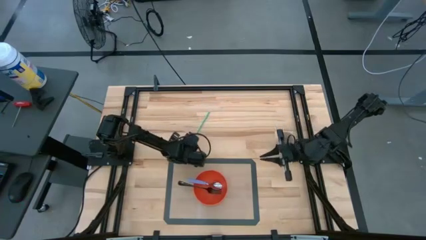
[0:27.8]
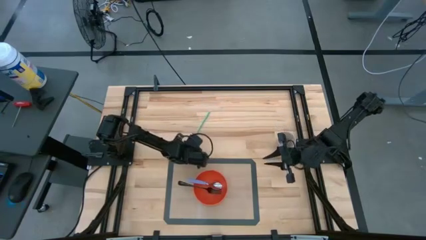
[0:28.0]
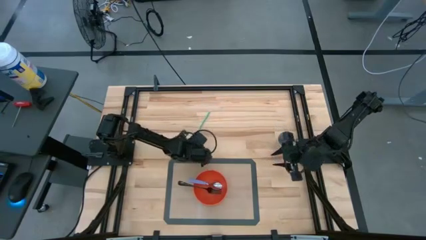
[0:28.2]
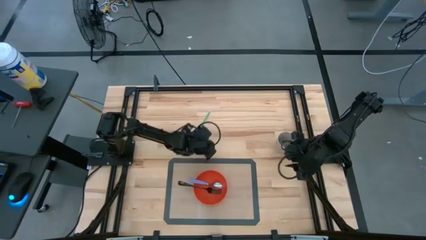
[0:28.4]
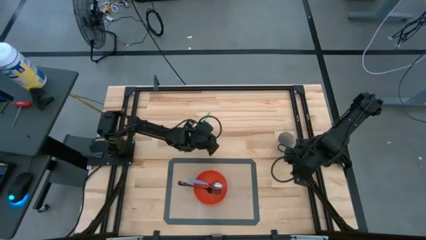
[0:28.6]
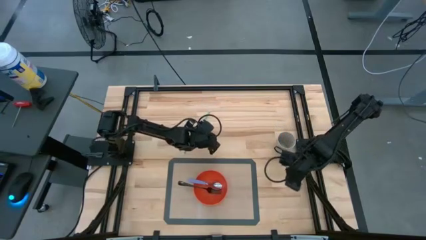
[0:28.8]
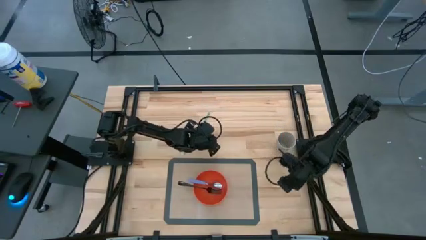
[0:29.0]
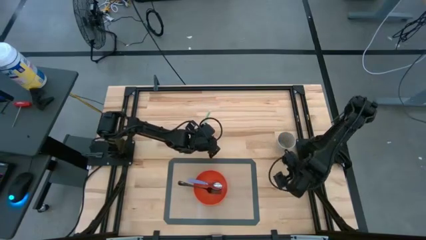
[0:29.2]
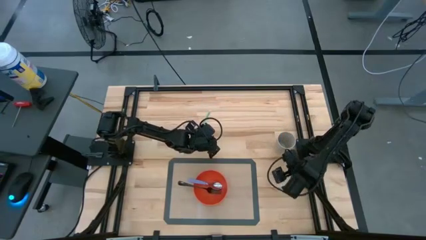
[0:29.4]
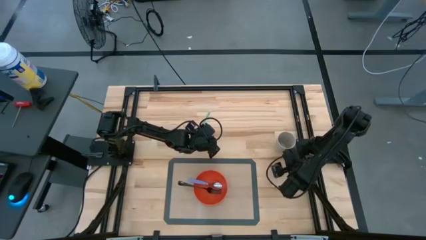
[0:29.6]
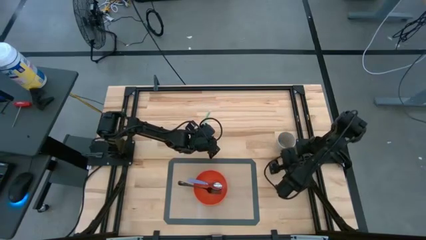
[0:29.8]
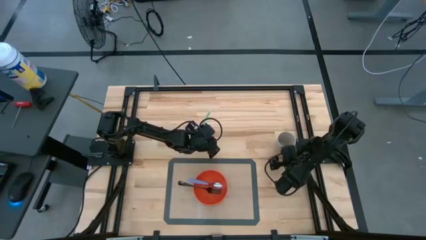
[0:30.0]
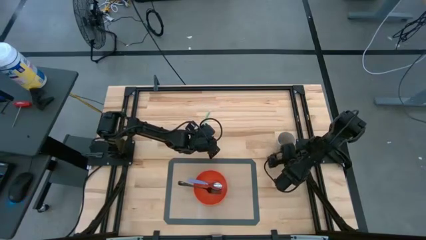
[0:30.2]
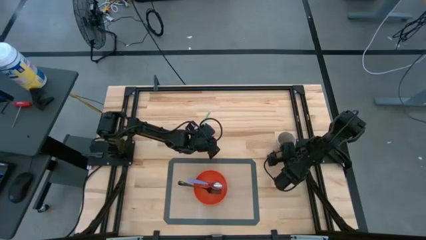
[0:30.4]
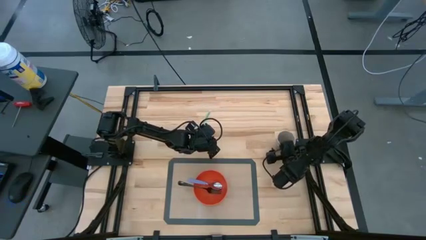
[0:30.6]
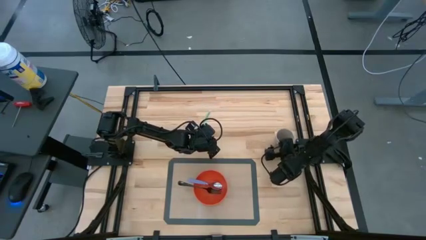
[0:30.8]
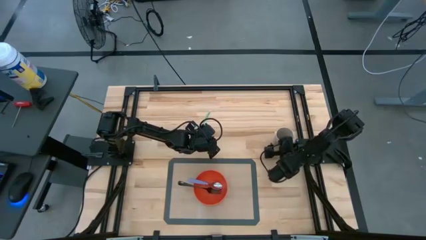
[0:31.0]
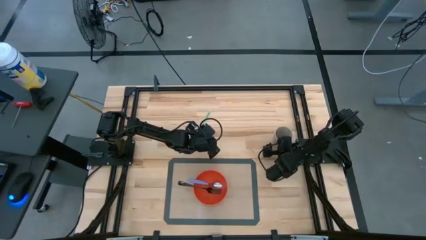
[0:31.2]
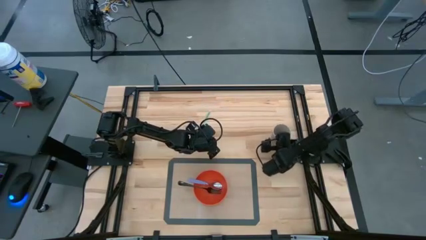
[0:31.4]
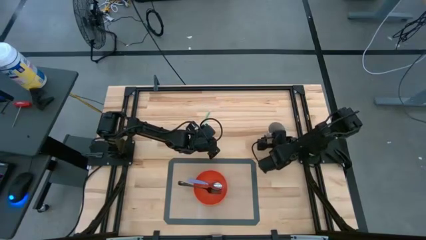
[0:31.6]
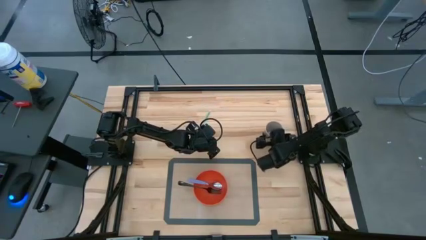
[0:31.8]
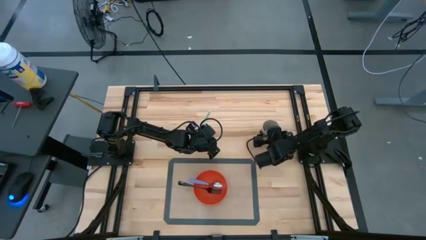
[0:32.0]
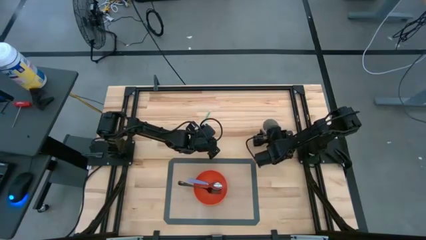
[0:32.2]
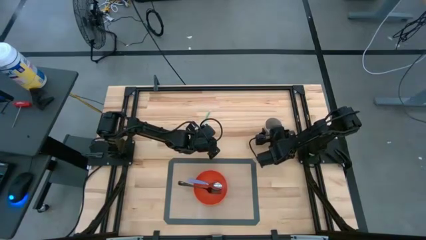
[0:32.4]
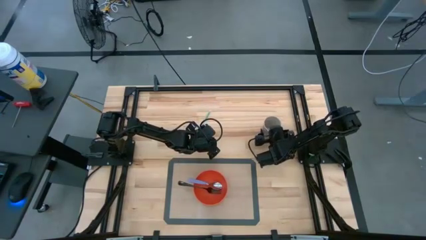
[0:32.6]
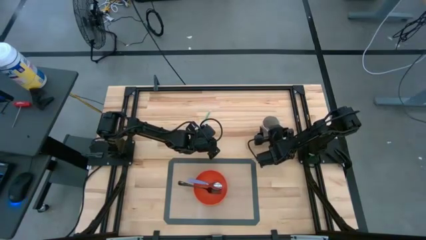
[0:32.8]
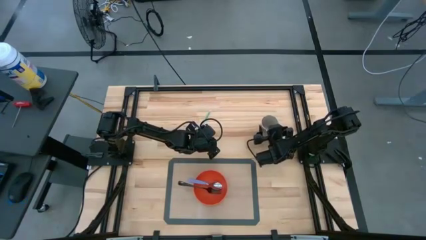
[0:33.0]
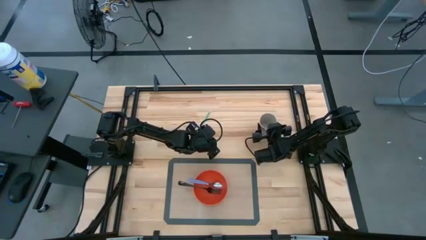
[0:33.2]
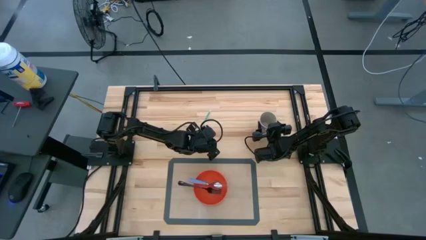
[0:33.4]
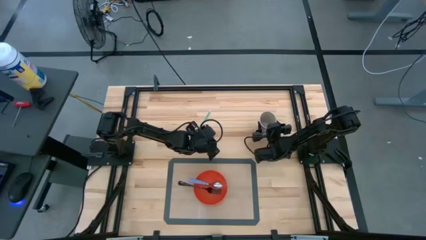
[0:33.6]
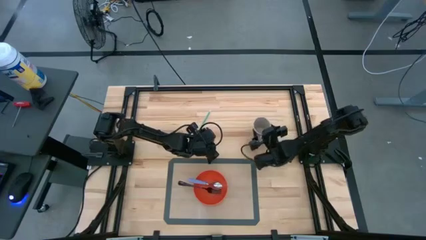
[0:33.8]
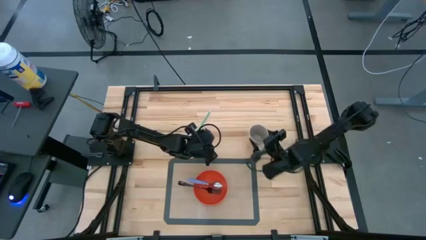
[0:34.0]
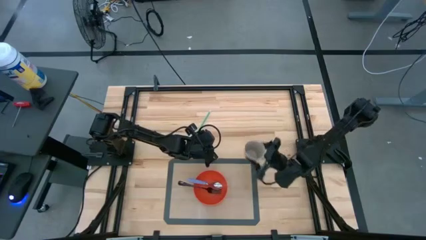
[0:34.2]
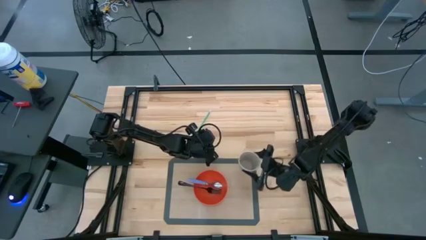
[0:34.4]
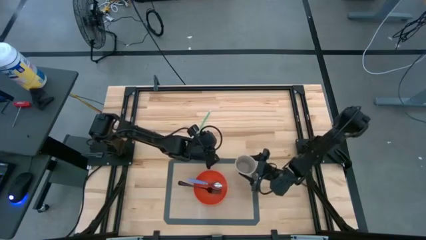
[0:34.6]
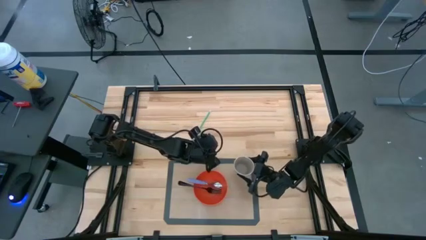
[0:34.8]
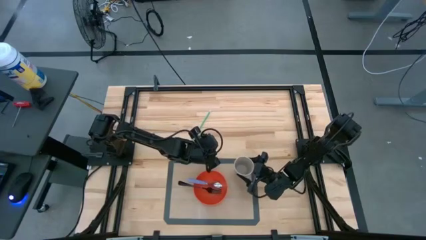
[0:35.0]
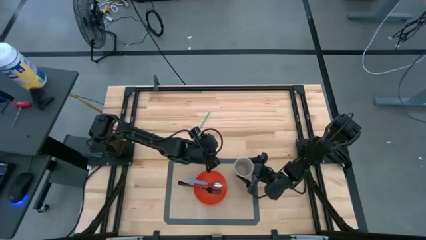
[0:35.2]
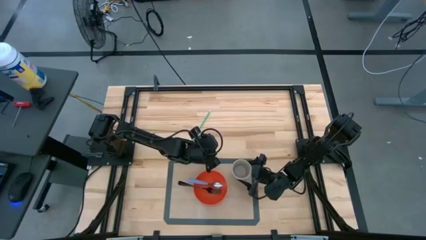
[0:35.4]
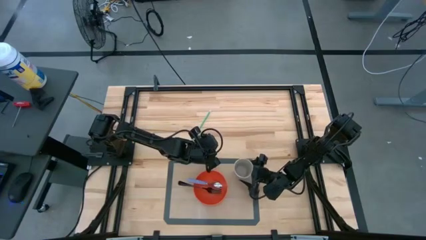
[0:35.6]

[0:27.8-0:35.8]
Task: Pick & Place Utensil
Put the white cup to the top right of the orange bowl

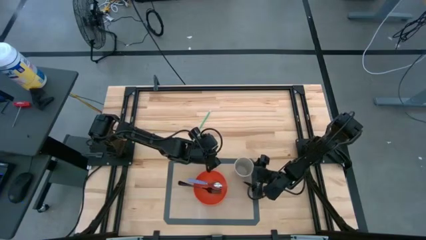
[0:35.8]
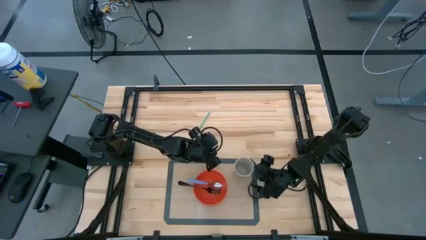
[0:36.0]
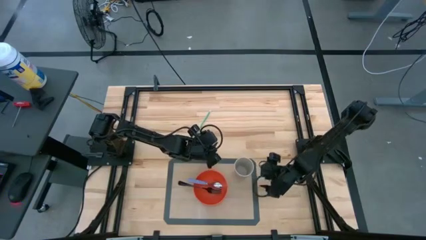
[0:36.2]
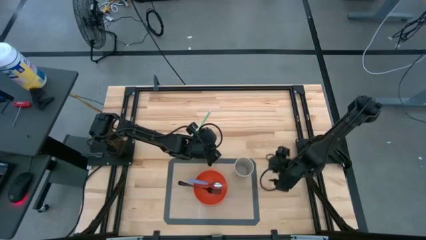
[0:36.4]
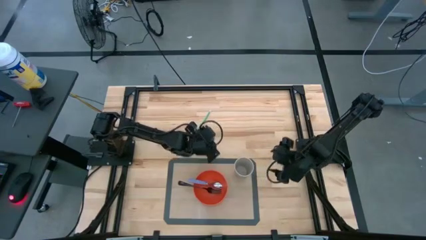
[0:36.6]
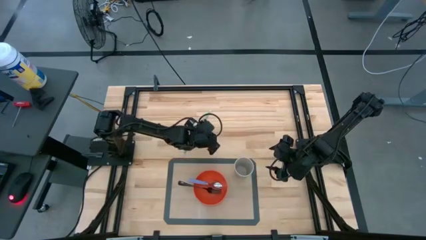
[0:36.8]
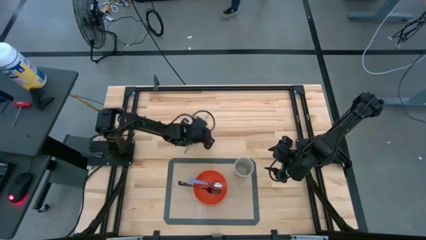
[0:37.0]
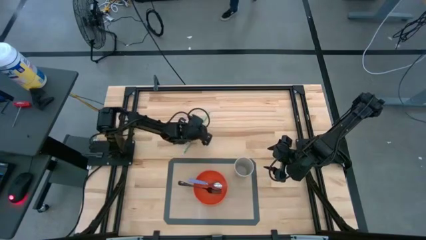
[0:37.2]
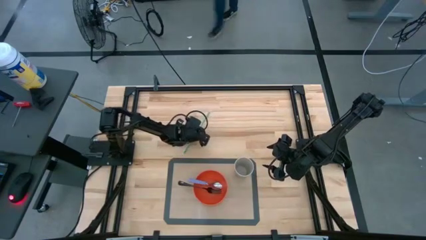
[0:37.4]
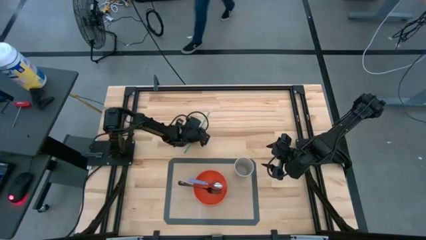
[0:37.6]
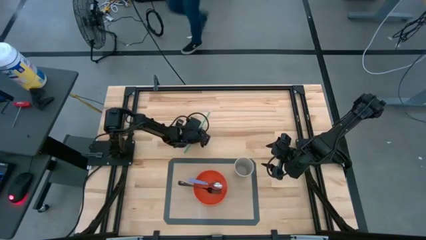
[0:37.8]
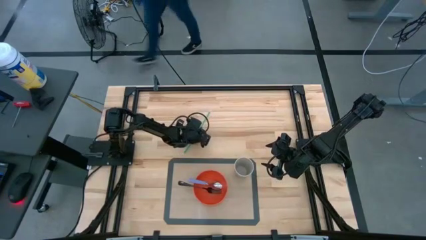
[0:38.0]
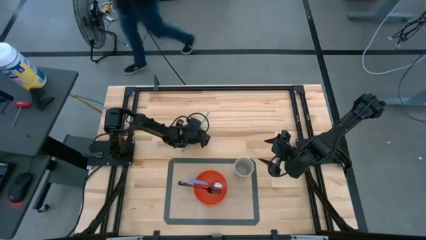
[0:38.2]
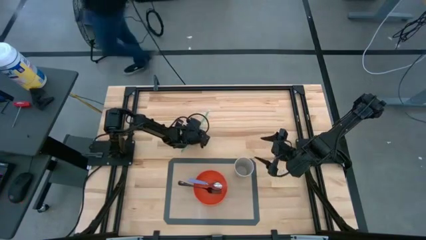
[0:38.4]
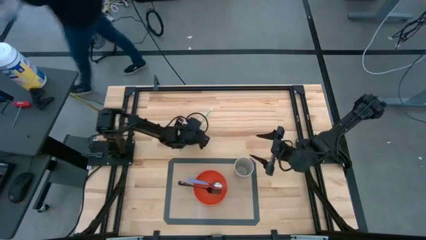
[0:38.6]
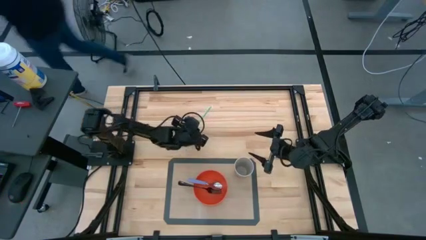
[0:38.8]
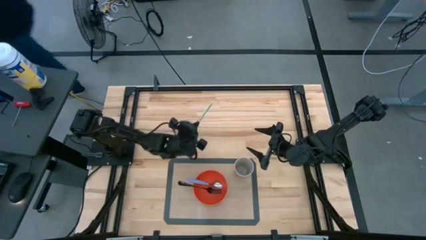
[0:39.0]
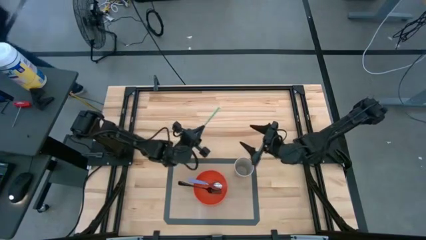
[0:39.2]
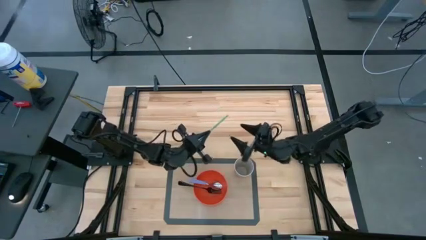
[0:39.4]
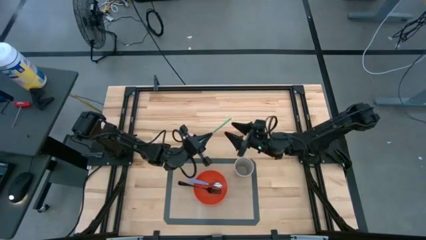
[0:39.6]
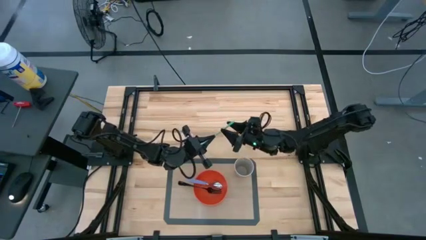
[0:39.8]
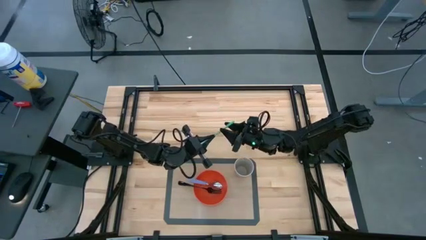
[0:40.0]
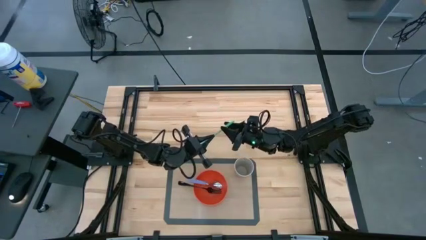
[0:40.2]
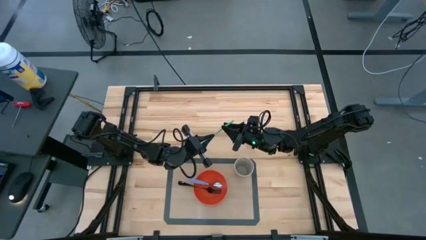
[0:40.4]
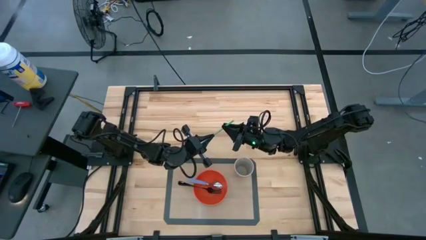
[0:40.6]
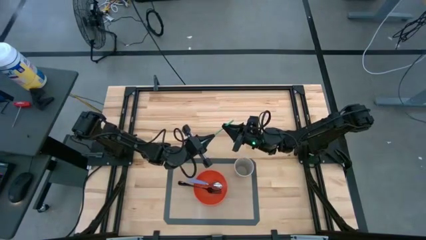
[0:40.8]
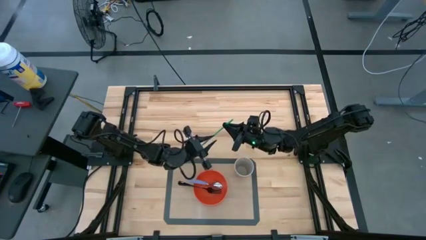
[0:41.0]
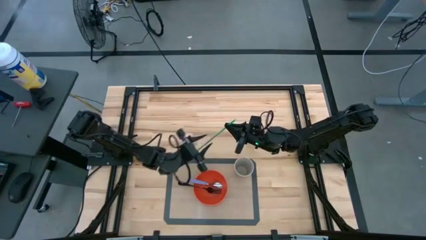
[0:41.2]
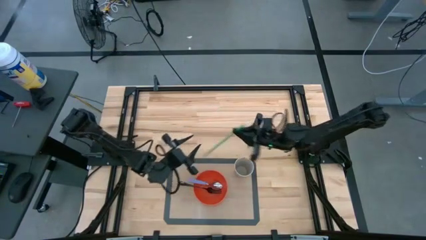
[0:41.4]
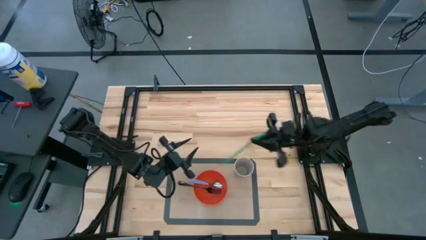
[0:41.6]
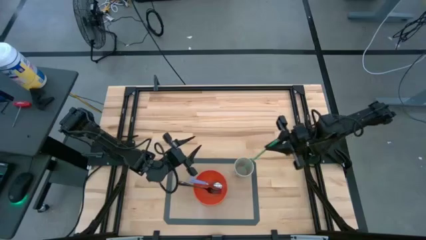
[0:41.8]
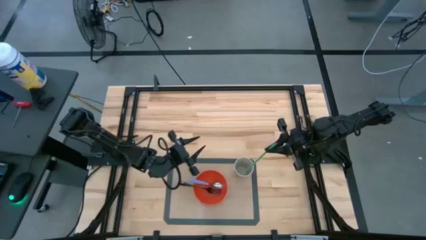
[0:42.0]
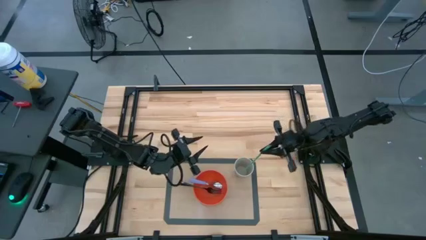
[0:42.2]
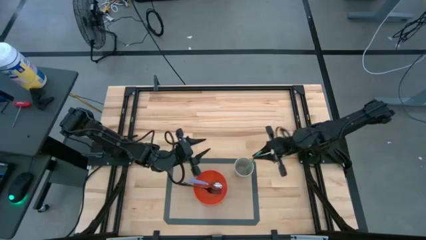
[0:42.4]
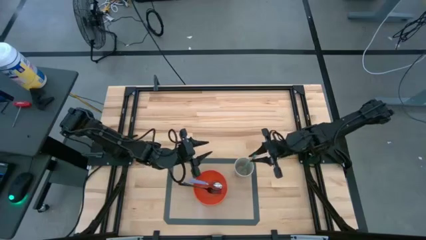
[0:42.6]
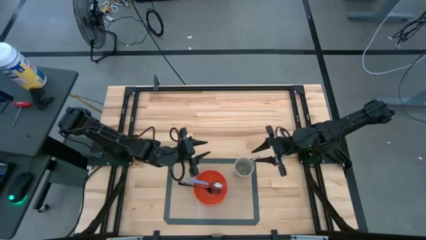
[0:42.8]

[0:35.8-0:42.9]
Put the straw into the white cup
